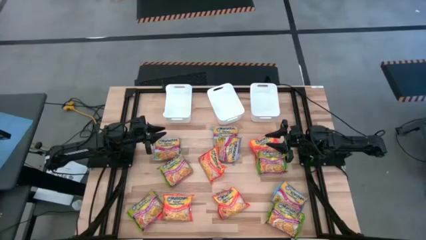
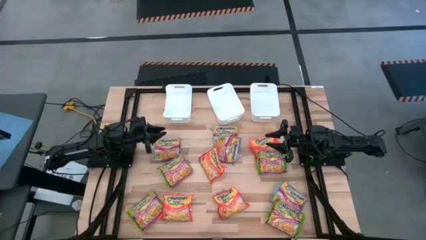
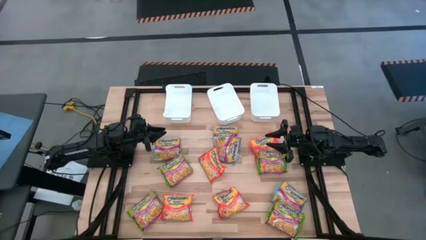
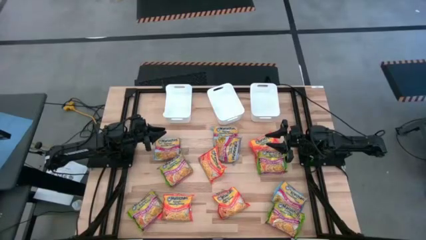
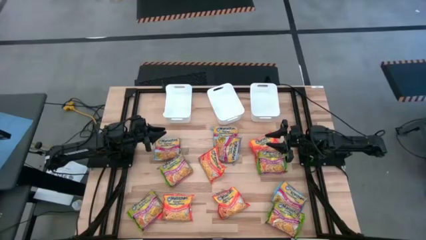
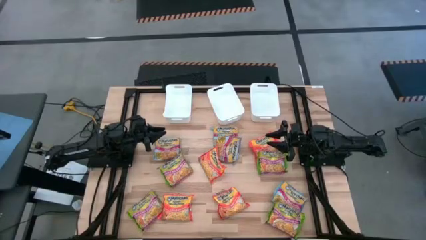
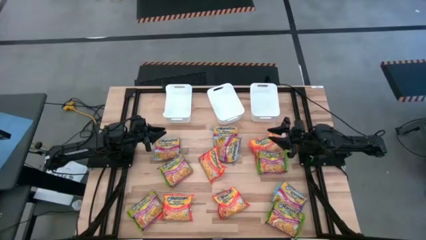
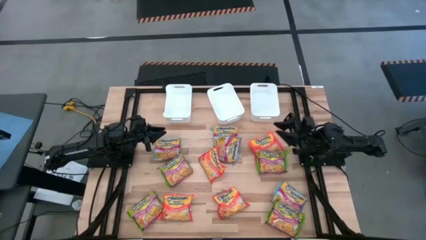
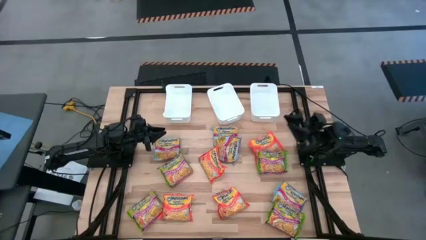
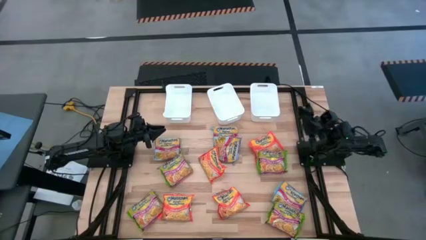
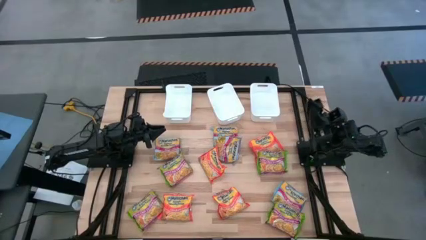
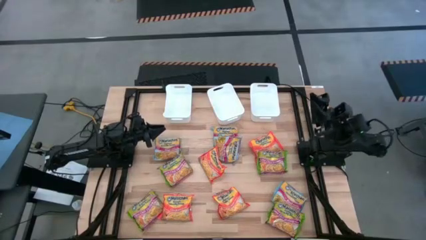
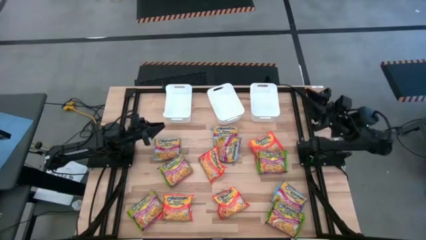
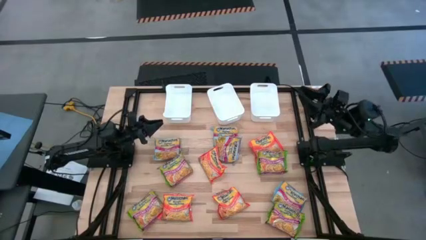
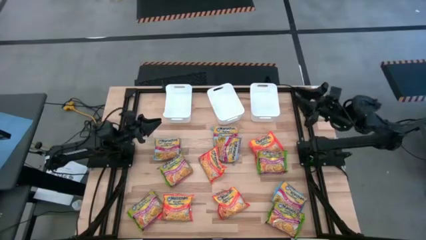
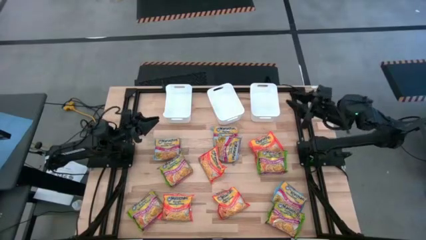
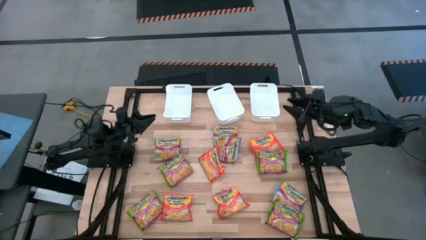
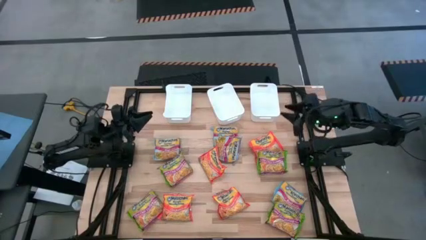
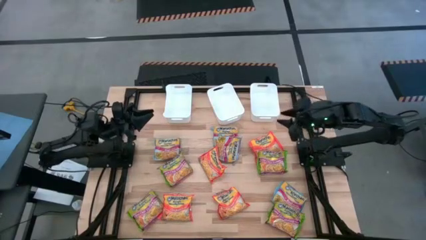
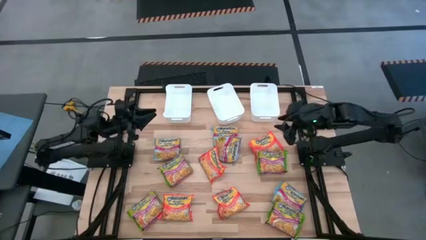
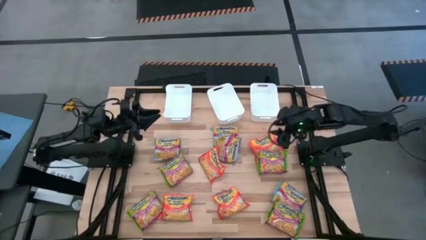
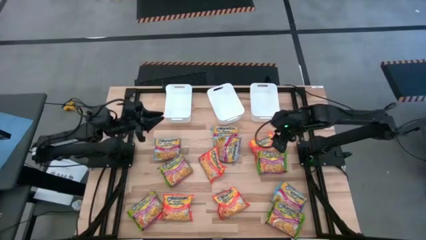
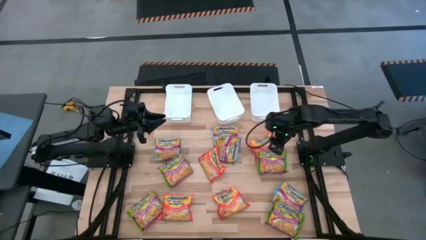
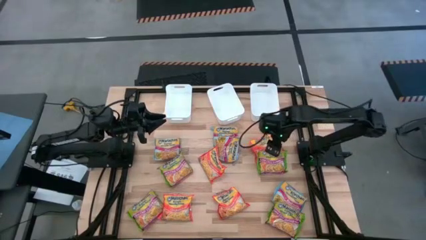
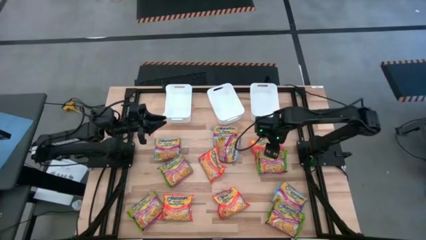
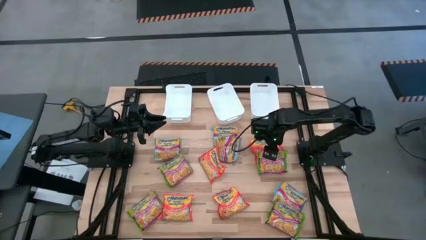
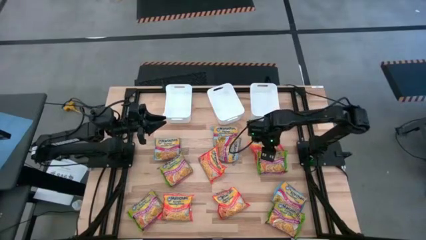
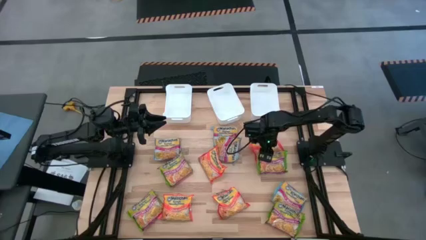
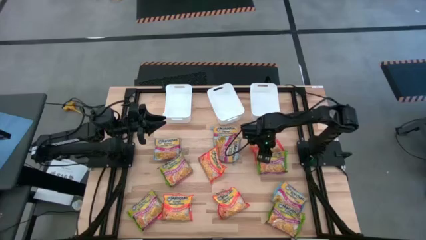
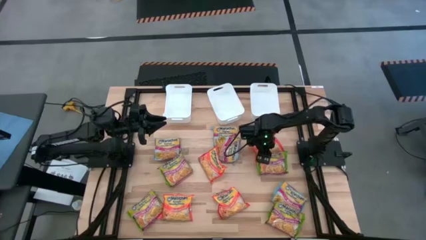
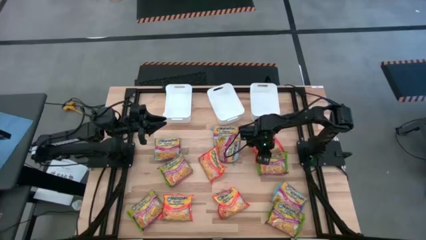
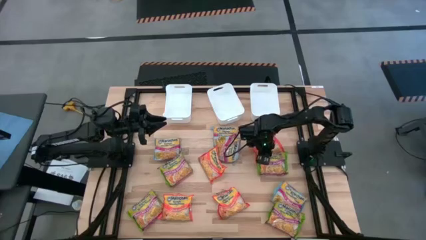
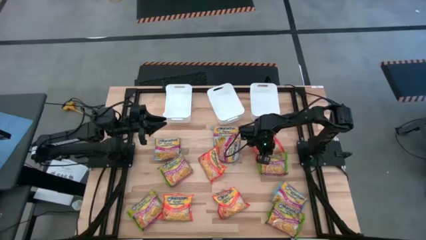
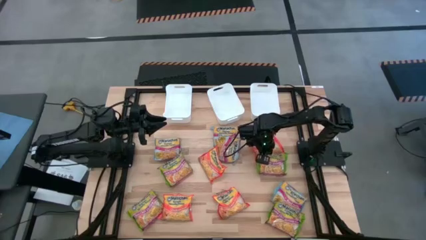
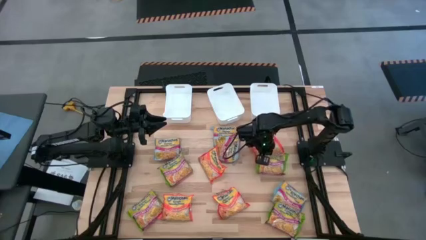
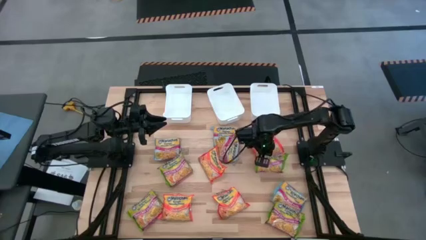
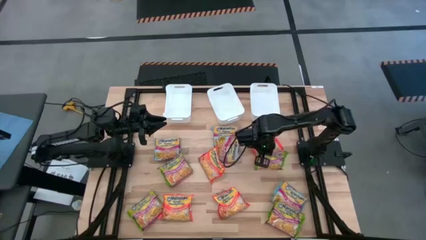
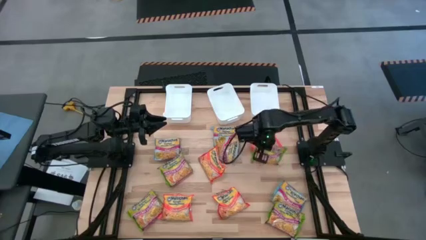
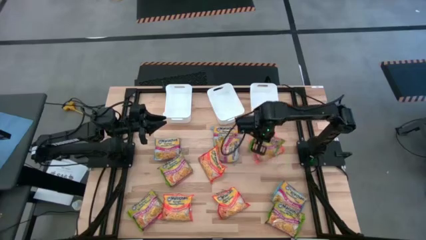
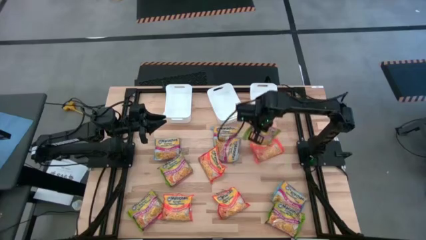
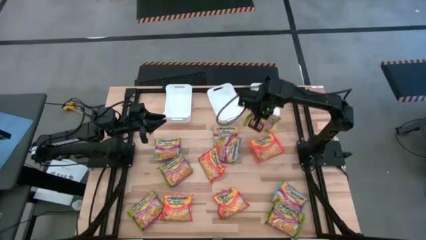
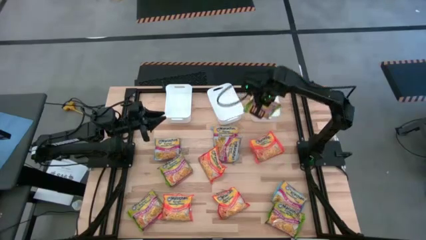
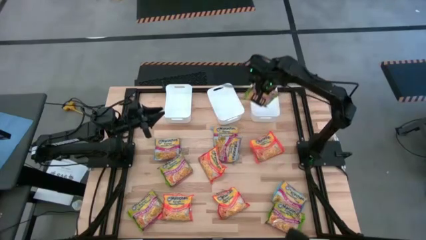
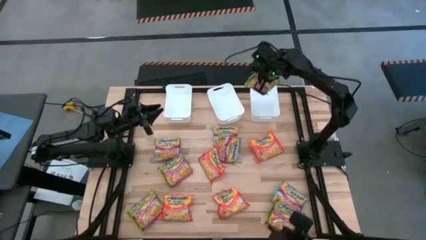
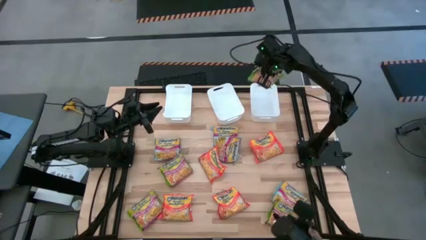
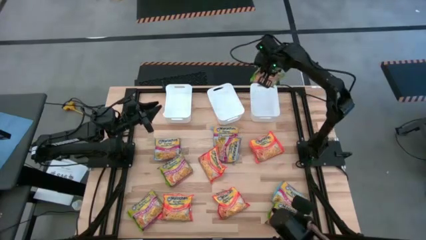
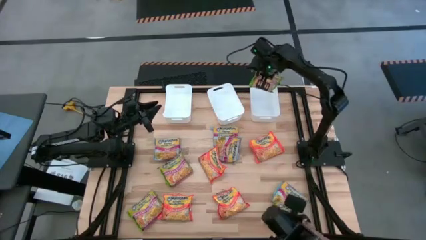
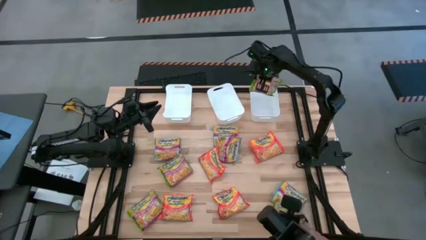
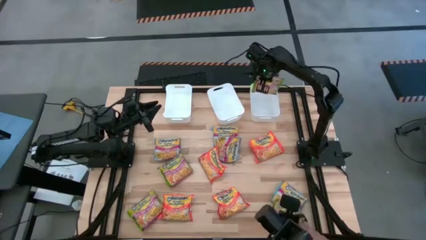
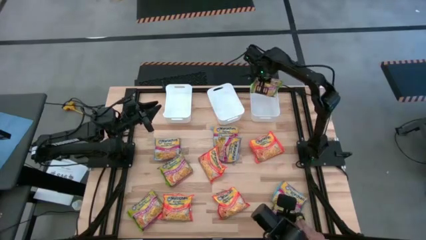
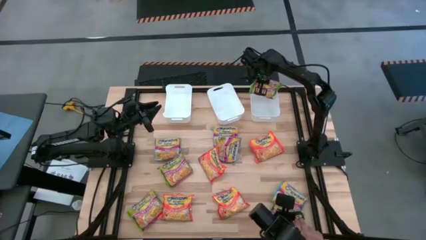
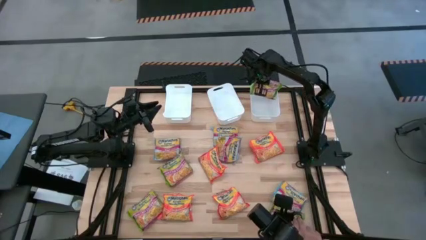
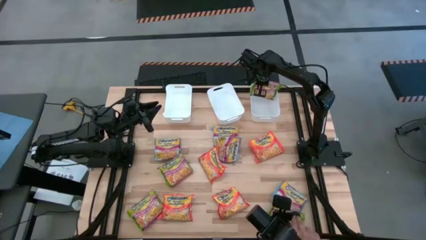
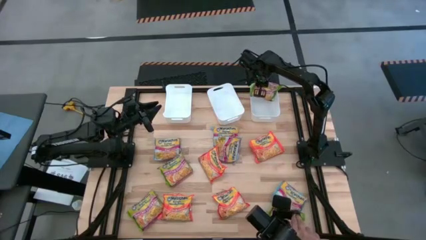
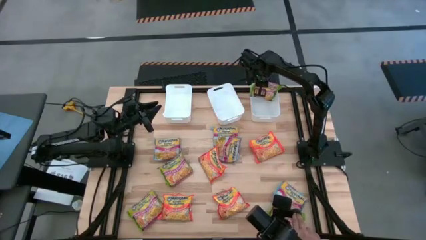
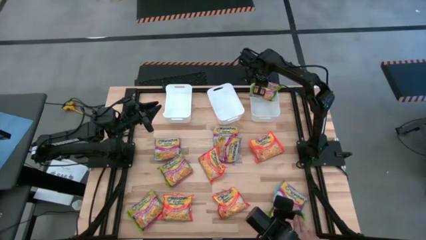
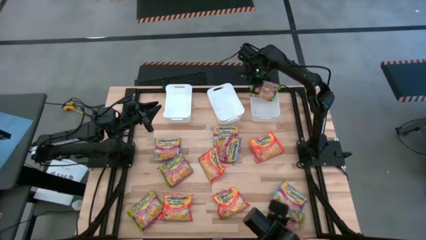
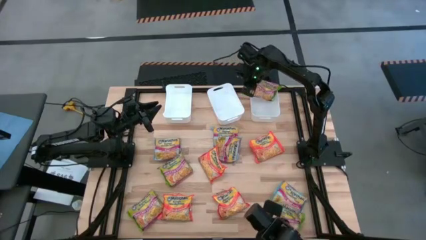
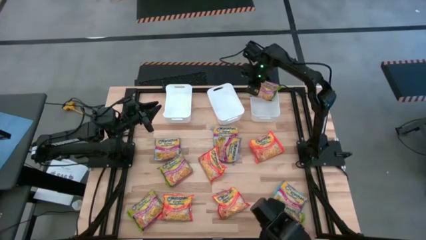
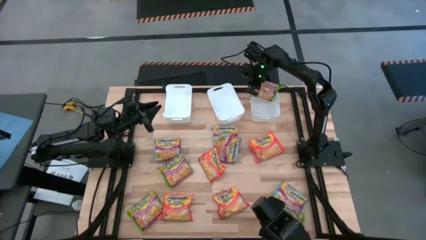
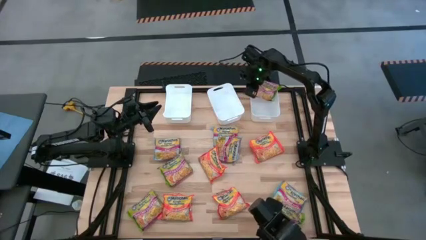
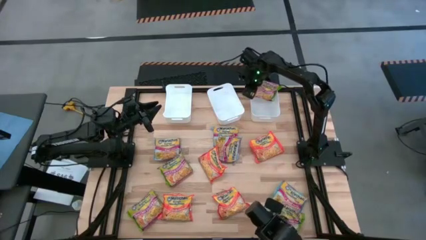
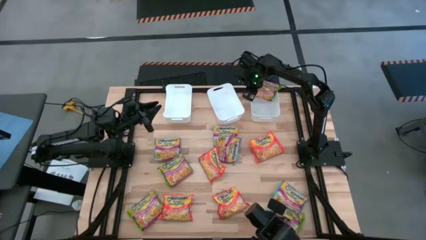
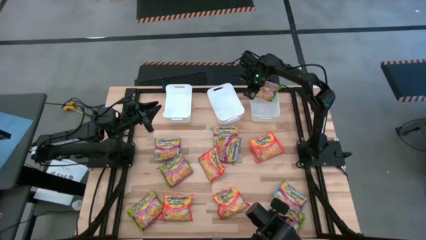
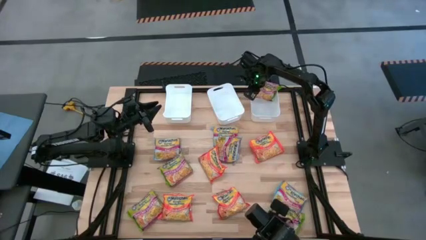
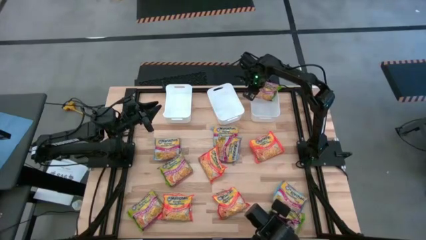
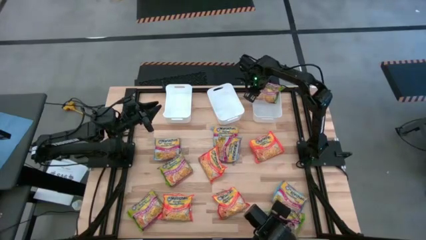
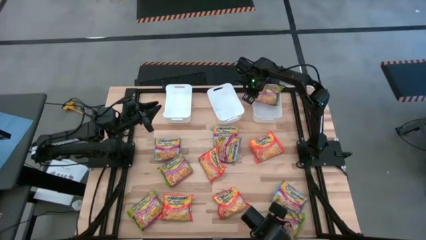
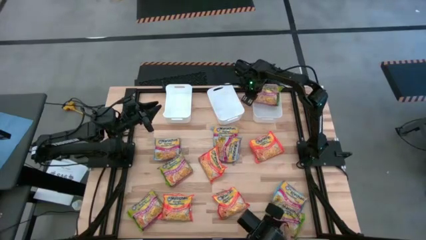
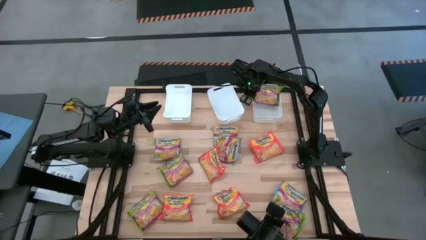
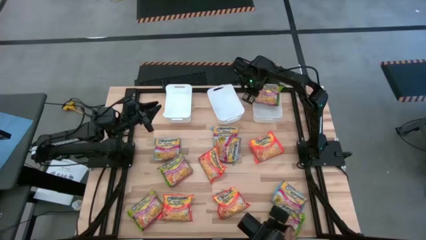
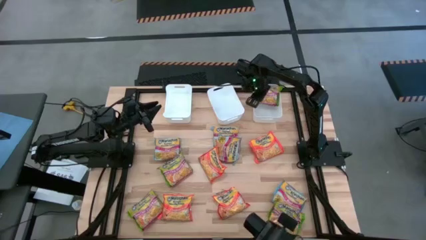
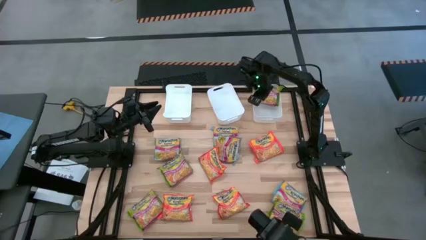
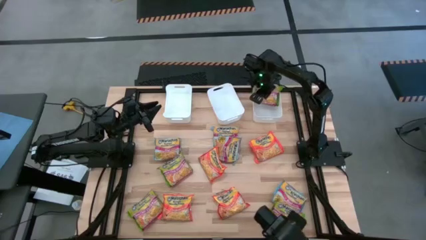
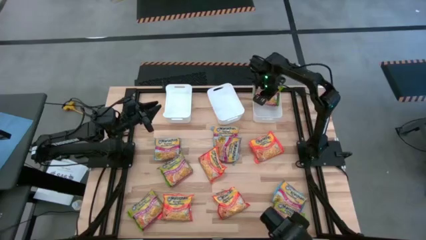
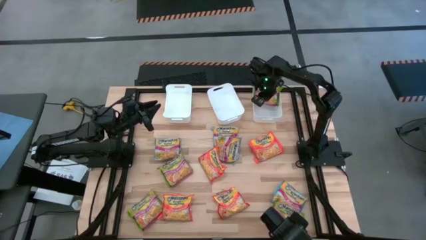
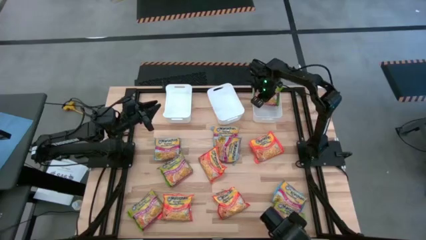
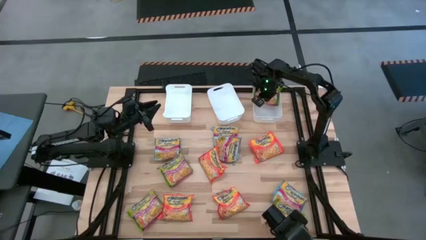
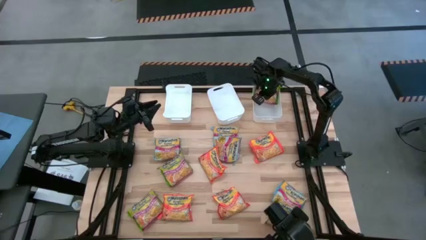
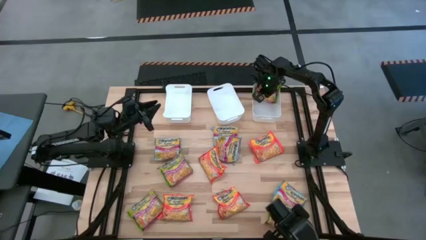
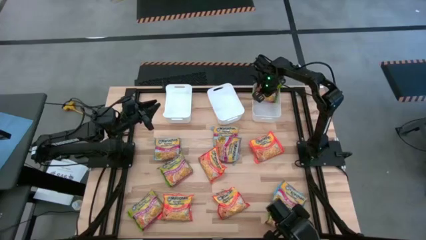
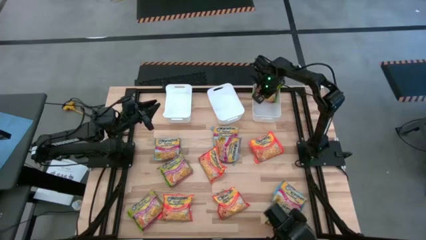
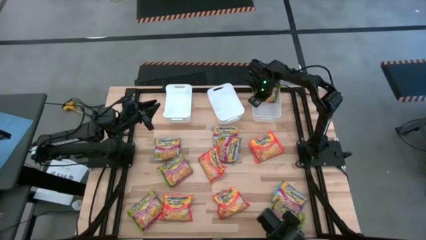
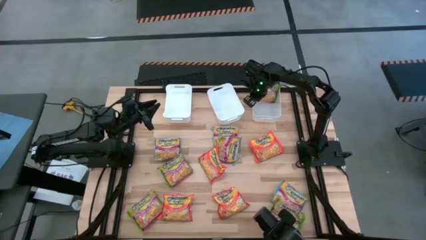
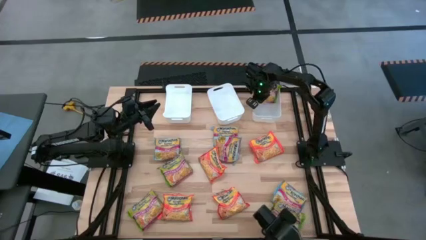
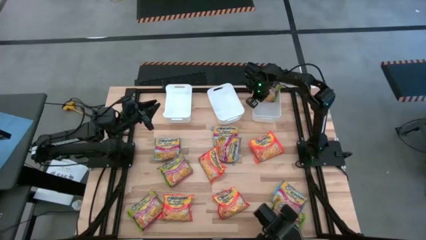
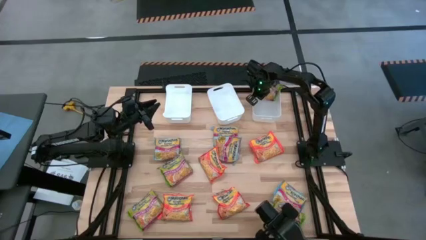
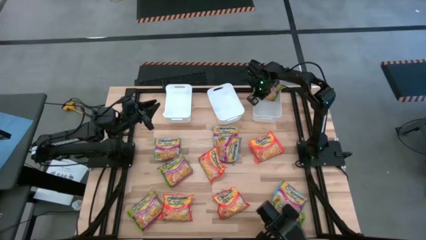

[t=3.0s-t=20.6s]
Task: Sort Maruchan noodles
Put the green noodle pack into the right white bin
